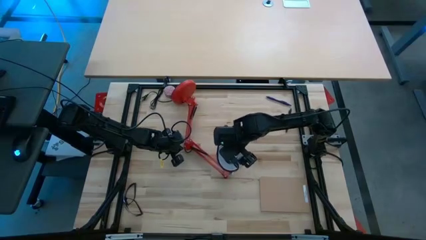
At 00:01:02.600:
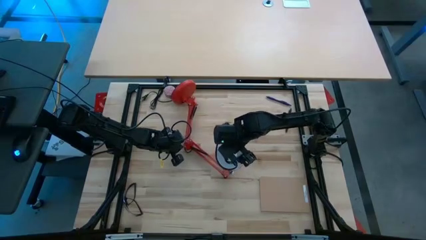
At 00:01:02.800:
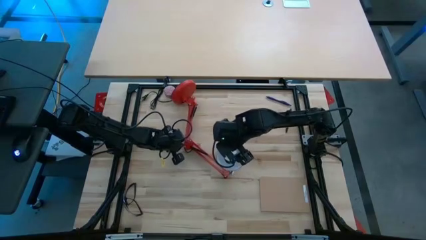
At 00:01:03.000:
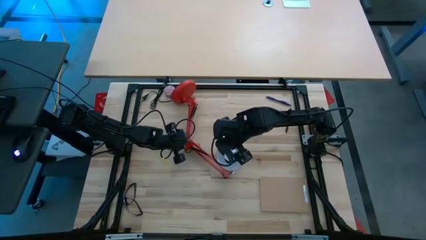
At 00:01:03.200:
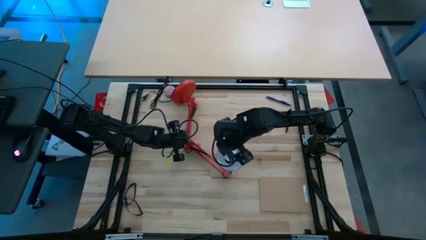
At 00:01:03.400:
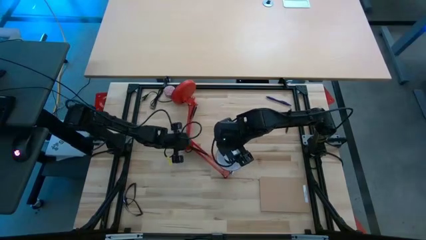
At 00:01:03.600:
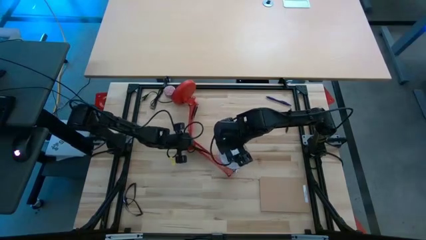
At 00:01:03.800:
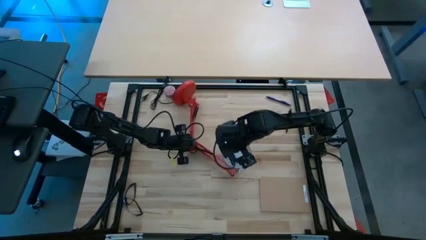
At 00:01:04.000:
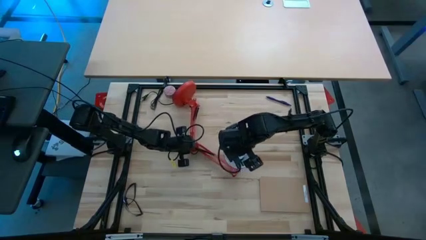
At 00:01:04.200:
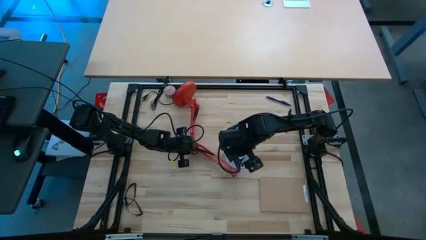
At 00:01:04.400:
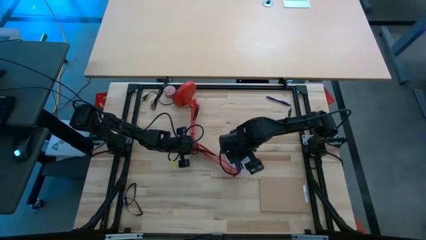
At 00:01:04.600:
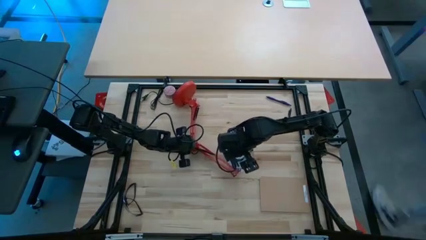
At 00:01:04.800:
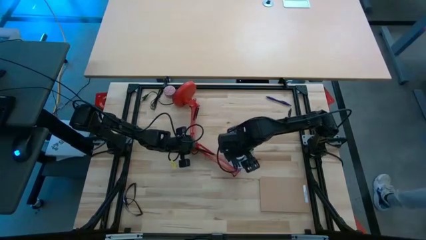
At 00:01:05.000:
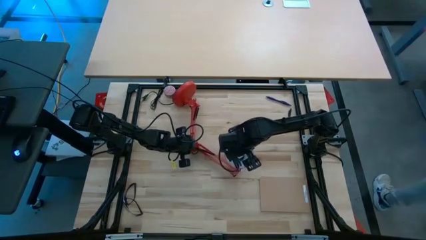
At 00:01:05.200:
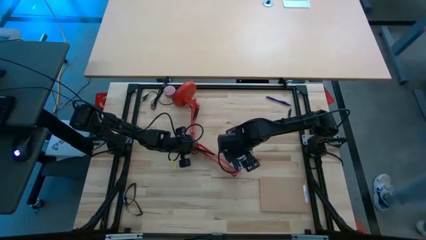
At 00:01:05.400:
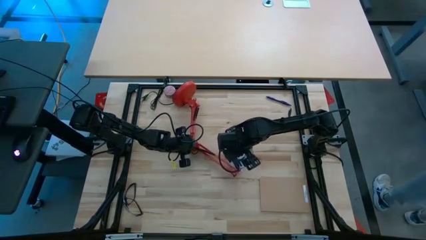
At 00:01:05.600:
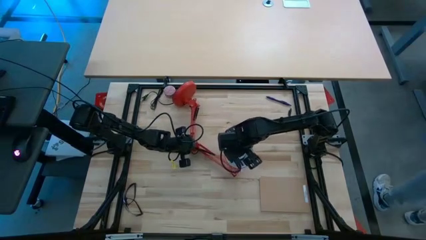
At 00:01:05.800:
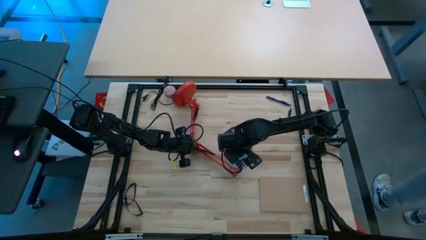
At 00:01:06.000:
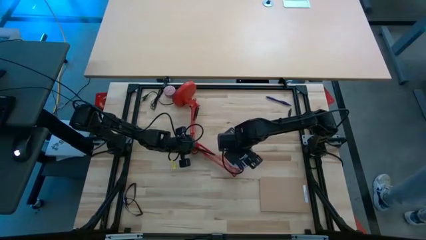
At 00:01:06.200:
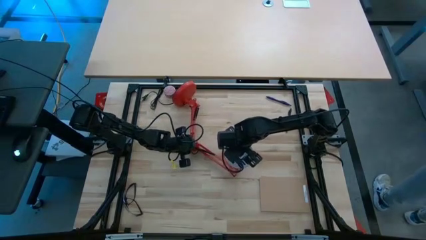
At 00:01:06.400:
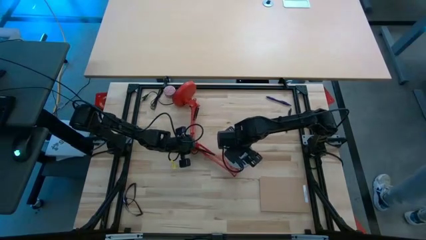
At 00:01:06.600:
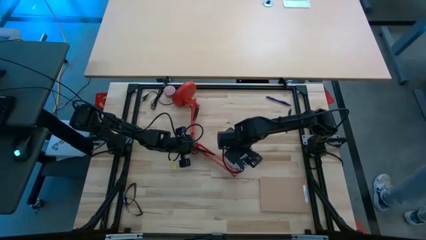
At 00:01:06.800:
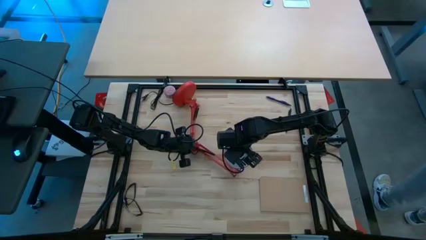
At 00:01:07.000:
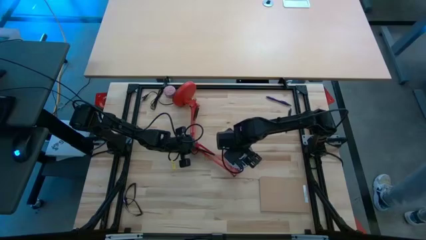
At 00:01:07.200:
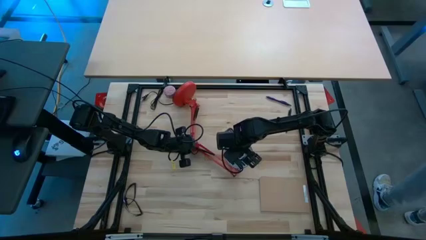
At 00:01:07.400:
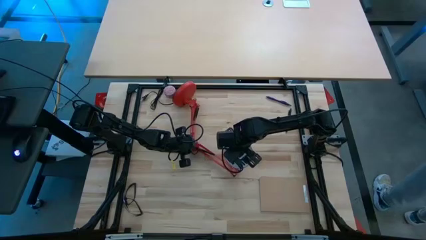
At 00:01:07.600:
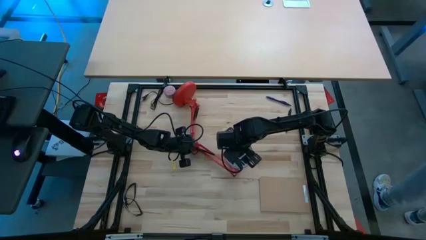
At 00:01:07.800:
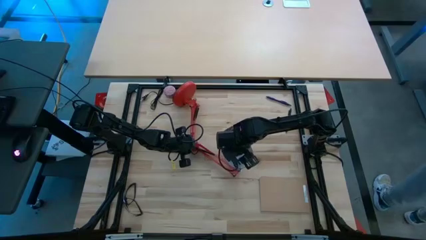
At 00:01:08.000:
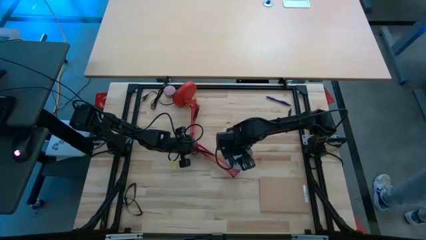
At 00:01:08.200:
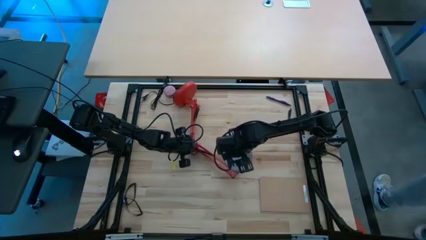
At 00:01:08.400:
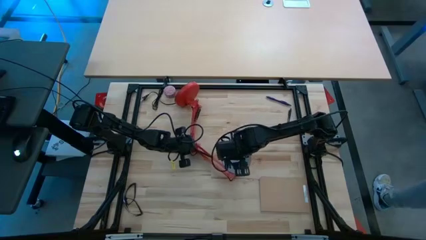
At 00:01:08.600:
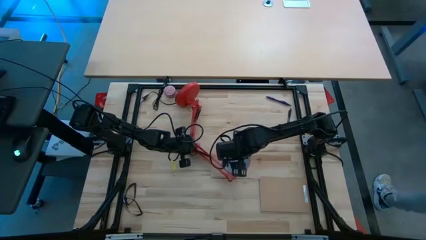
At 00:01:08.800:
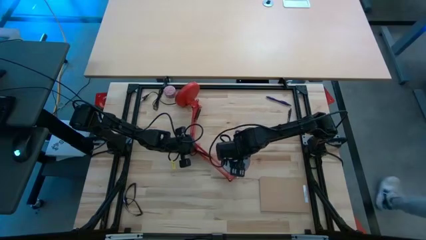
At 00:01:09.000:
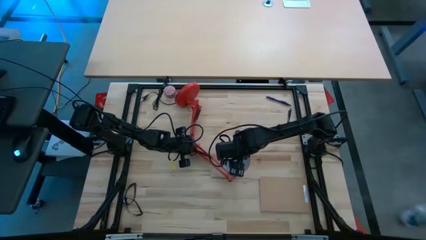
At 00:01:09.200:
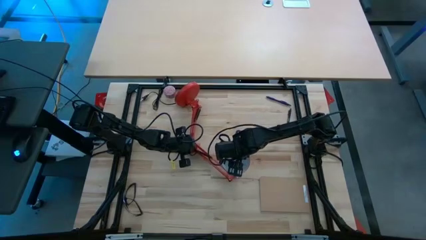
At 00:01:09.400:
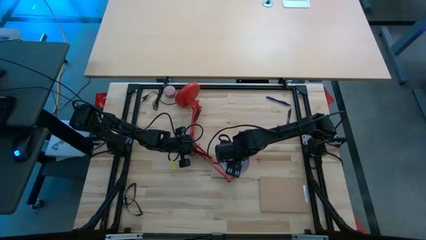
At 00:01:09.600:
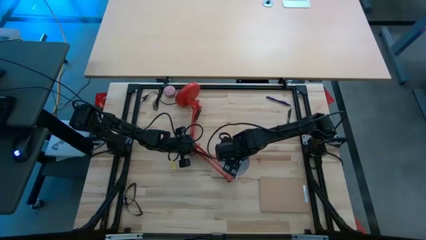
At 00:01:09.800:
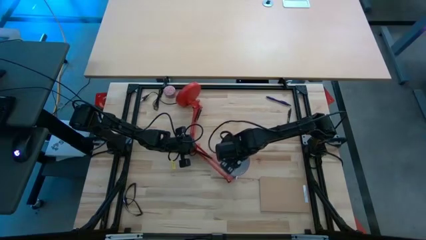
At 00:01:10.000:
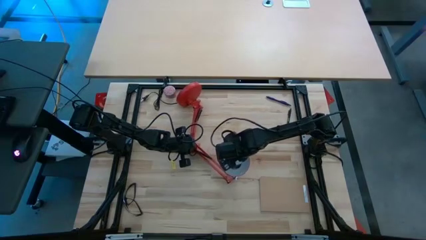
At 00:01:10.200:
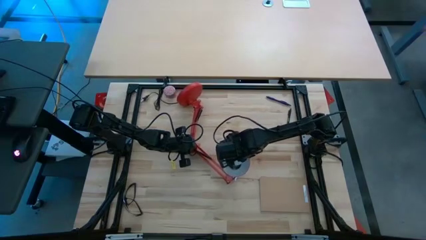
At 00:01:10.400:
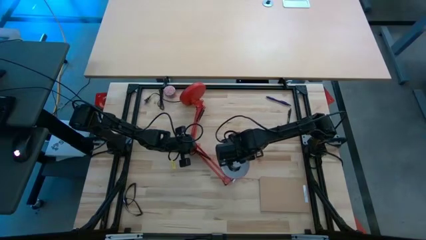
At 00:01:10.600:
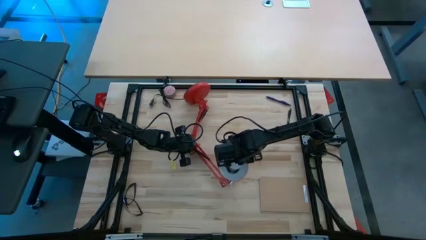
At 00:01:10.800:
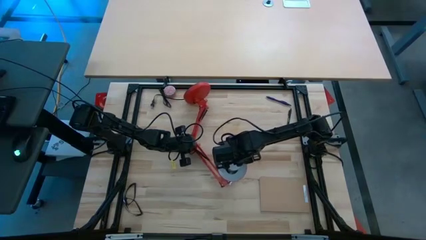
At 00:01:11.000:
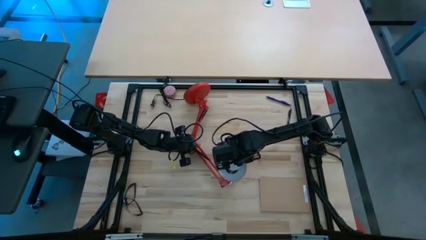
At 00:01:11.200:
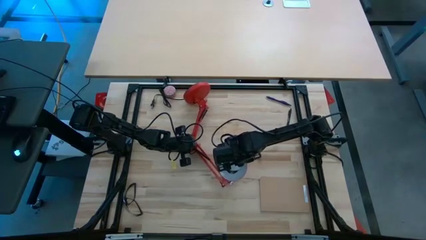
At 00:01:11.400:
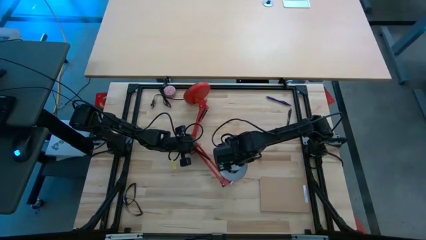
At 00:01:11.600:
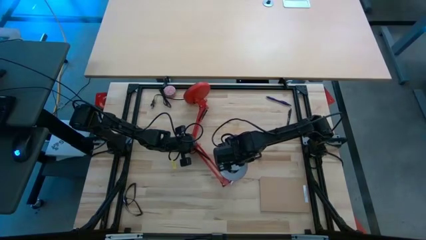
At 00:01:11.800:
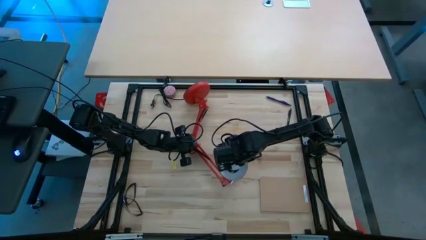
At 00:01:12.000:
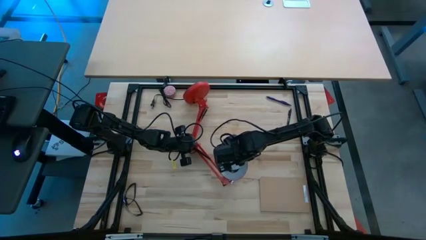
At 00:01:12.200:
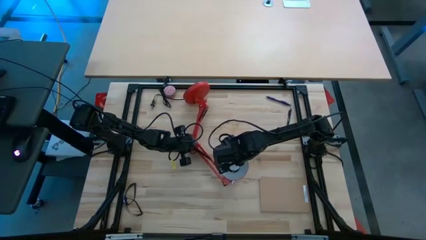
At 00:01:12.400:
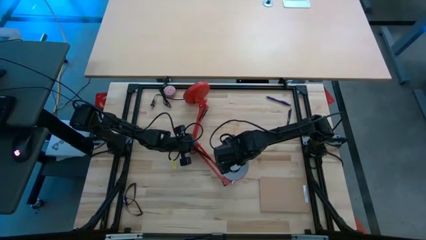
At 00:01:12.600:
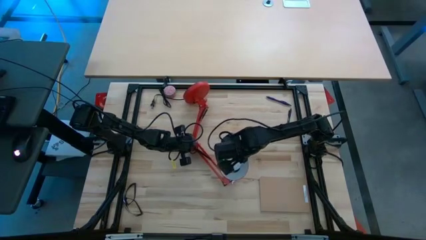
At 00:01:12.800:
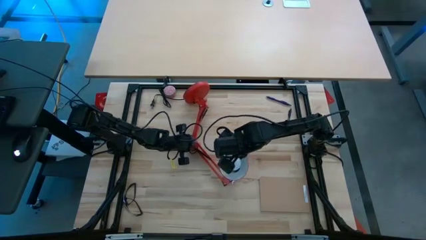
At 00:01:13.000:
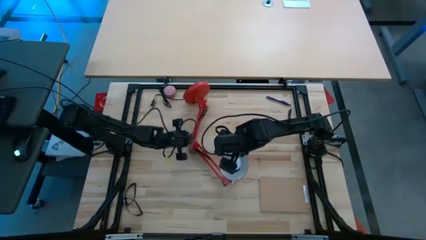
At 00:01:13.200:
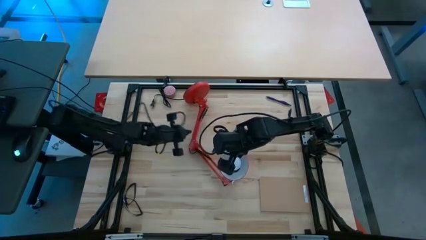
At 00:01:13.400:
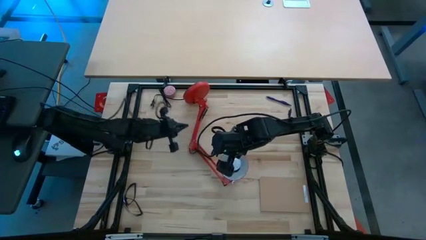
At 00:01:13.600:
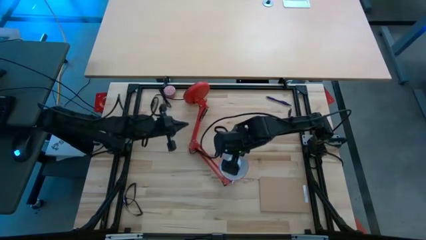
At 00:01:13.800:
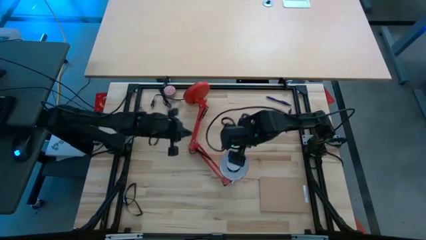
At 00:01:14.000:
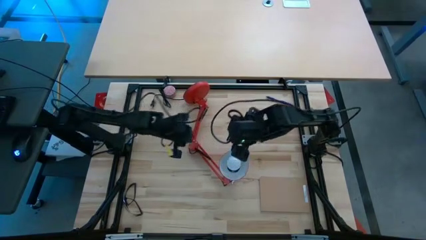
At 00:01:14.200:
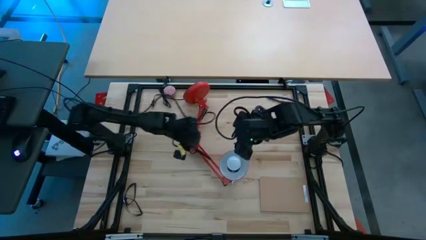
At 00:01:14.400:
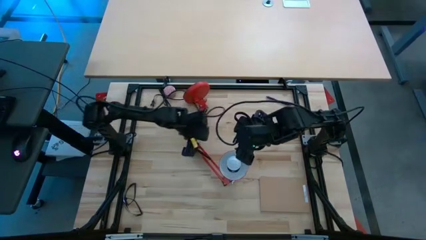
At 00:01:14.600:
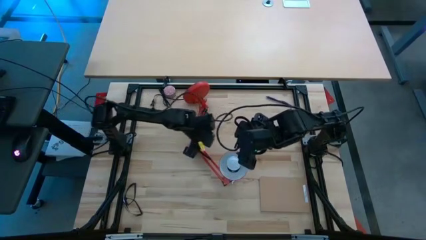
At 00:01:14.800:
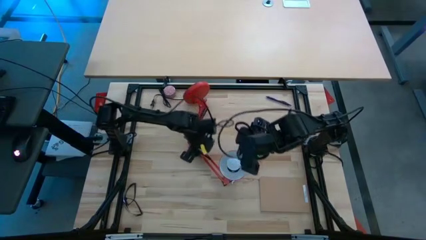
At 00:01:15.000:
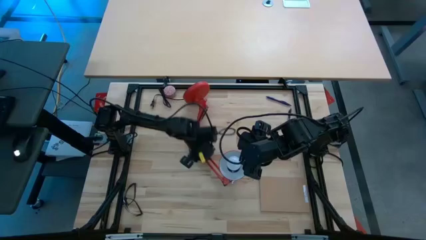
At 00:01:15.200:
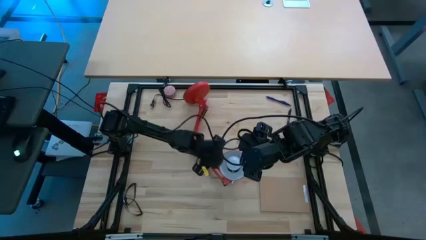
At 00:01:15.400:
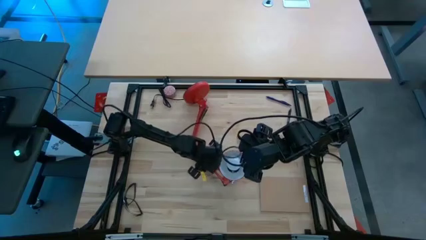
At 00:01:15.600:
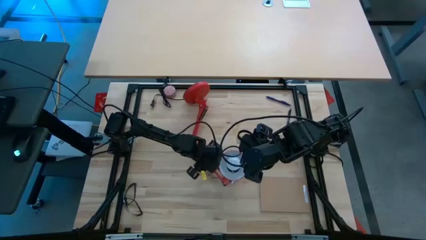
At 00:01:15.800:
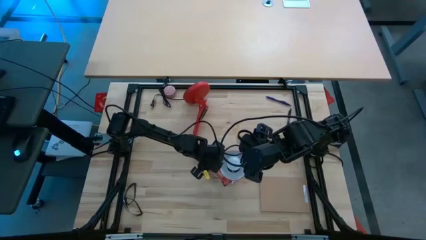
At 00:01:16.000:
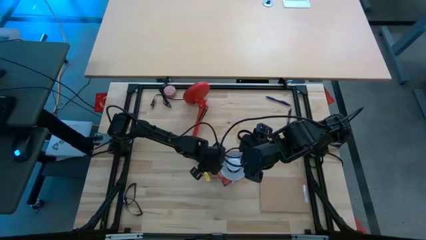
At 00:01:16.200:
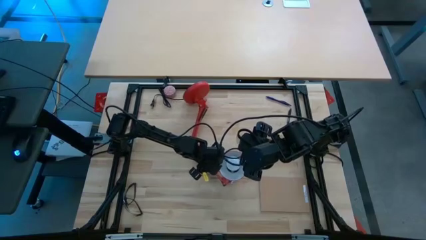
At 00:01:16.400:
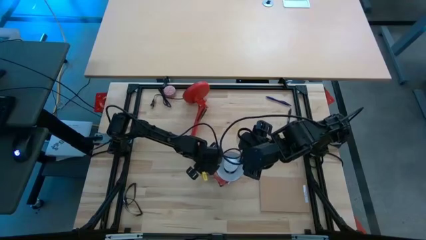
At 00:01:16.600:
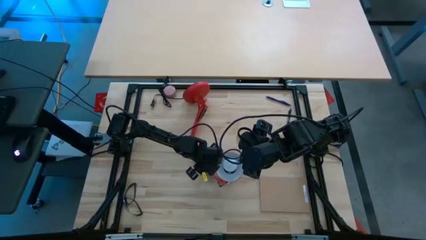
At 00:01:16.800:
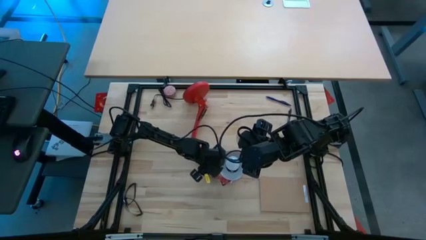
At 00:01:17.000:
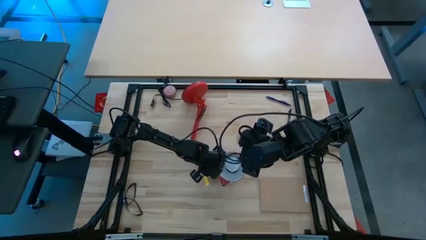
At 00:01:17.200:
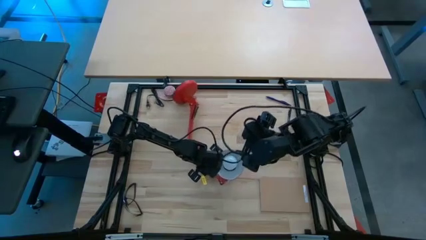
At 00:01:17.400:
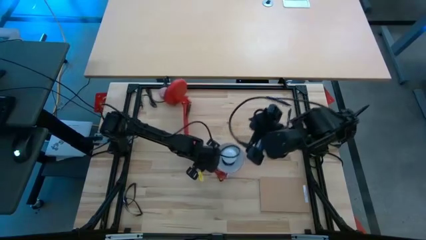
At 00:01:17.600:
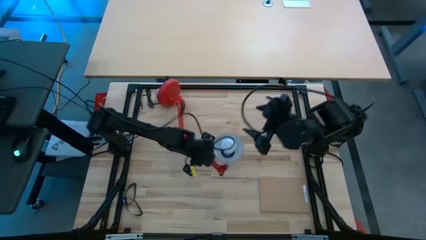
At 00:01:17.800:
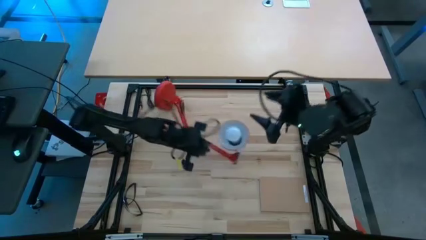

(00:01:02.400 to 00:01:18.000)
Task: Screw lightbulb
Insert the lightbulb into the desk lamp
